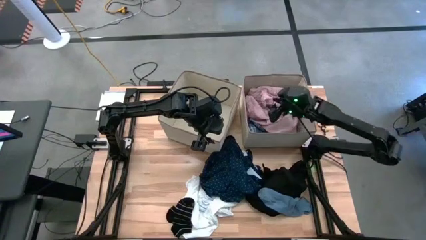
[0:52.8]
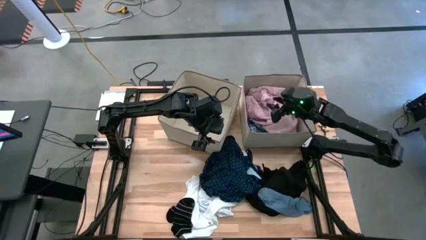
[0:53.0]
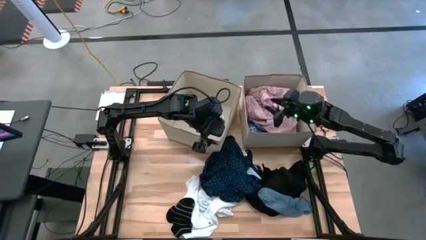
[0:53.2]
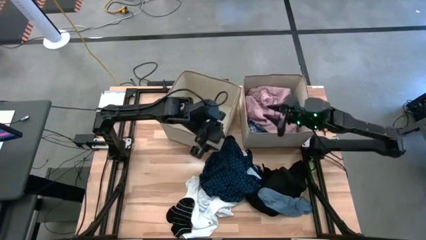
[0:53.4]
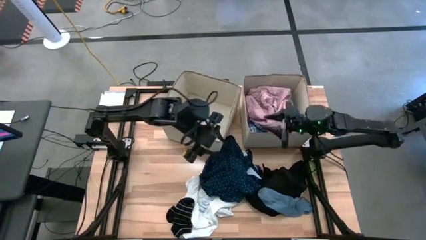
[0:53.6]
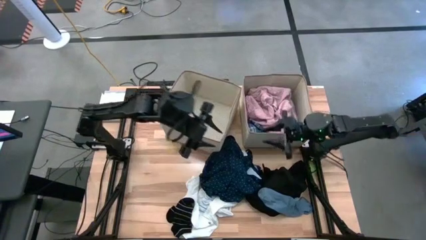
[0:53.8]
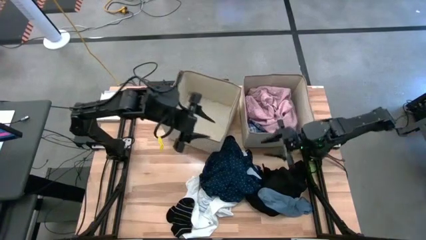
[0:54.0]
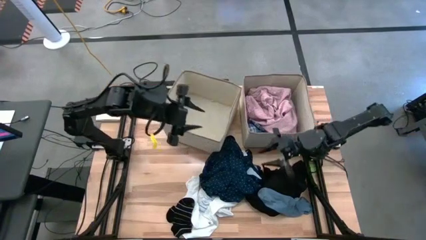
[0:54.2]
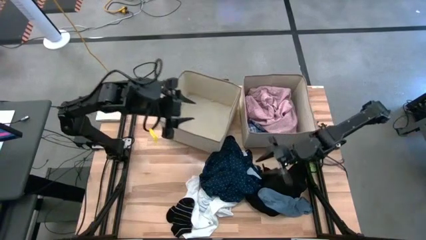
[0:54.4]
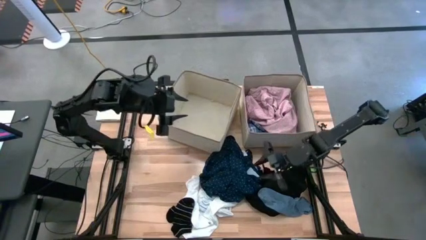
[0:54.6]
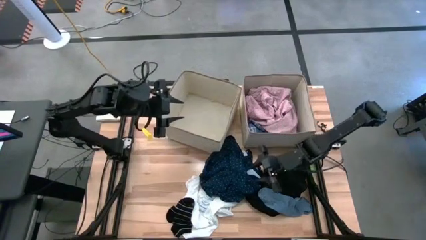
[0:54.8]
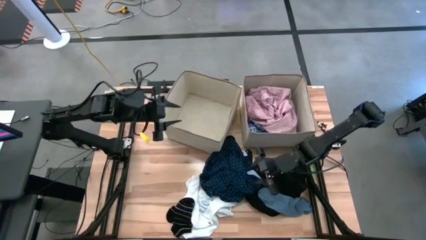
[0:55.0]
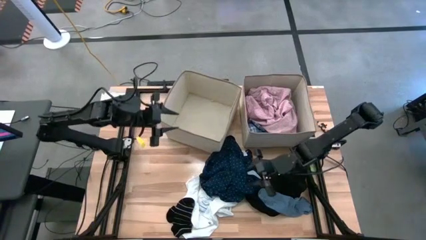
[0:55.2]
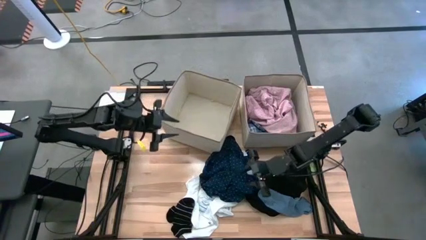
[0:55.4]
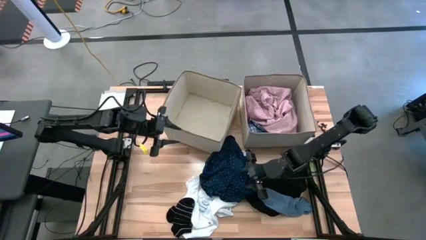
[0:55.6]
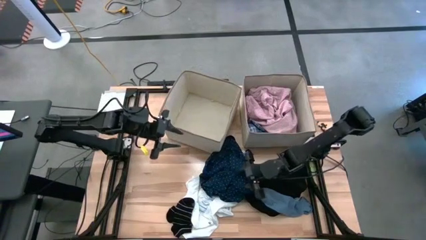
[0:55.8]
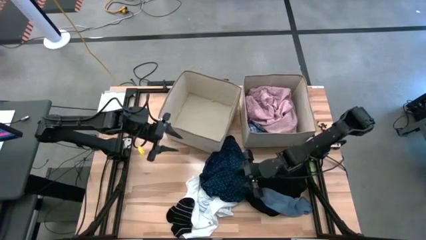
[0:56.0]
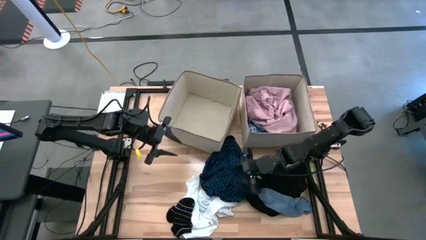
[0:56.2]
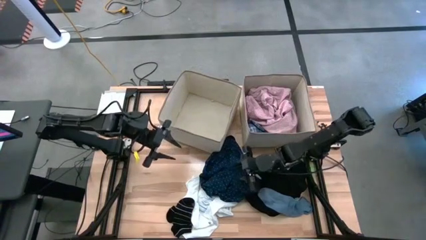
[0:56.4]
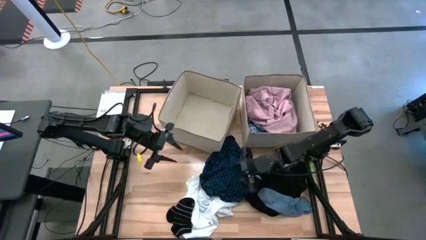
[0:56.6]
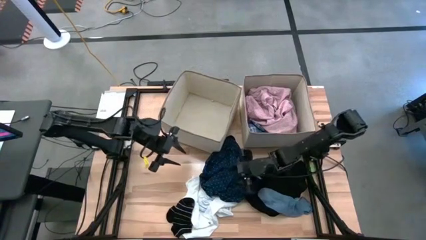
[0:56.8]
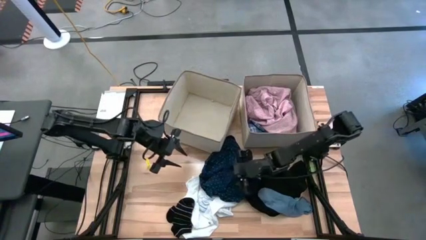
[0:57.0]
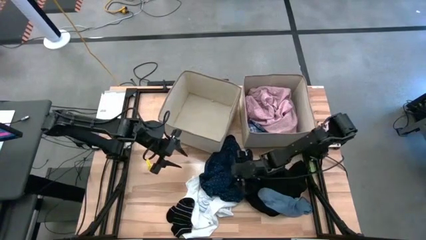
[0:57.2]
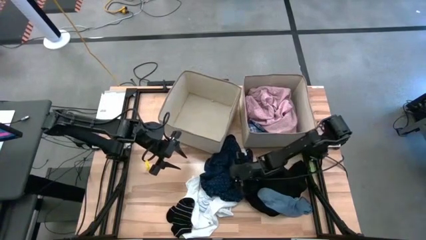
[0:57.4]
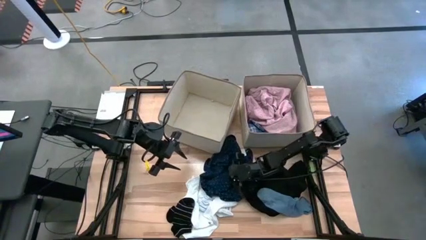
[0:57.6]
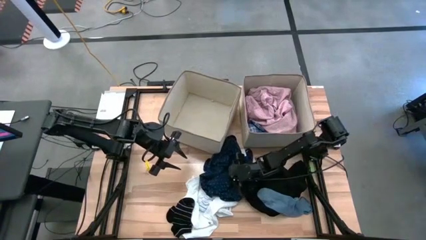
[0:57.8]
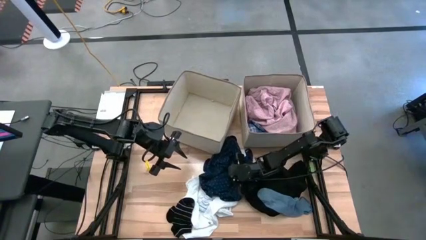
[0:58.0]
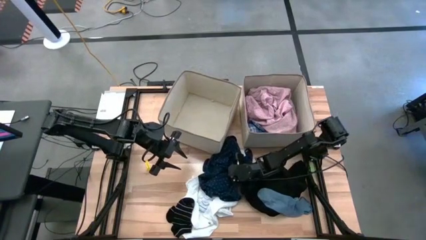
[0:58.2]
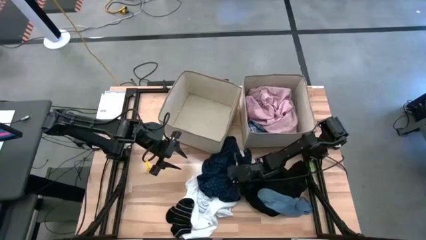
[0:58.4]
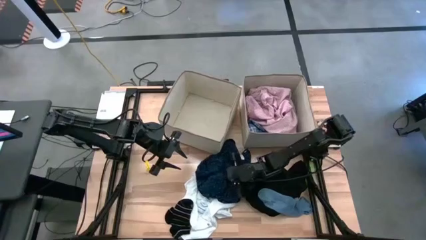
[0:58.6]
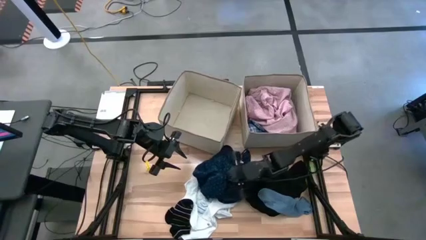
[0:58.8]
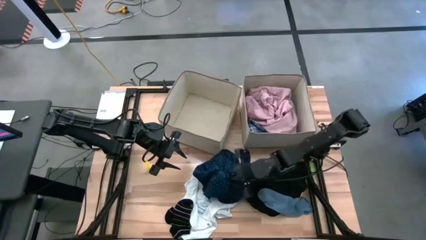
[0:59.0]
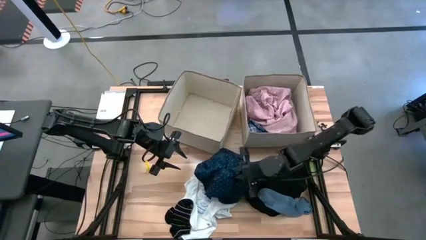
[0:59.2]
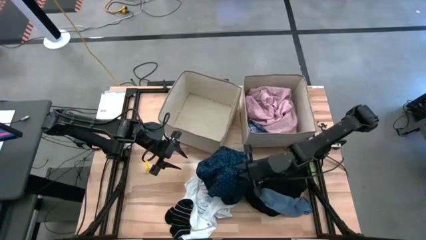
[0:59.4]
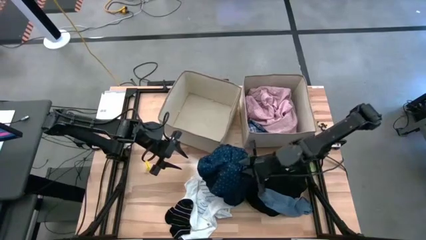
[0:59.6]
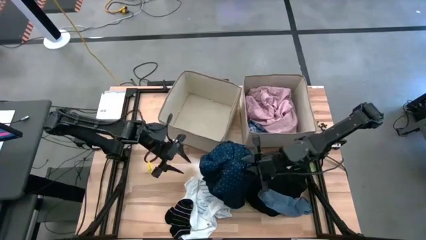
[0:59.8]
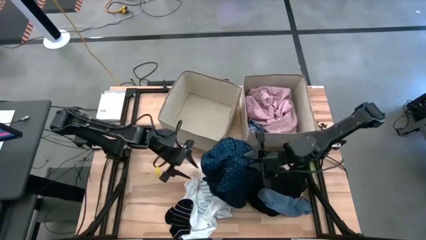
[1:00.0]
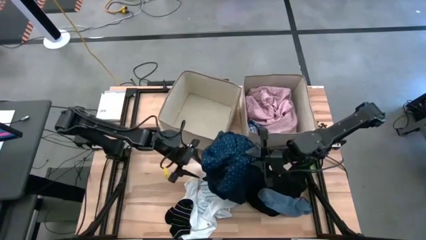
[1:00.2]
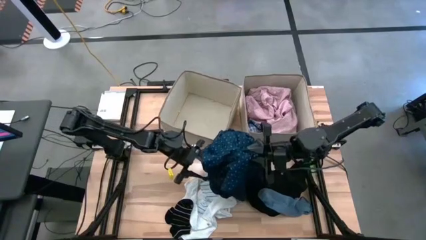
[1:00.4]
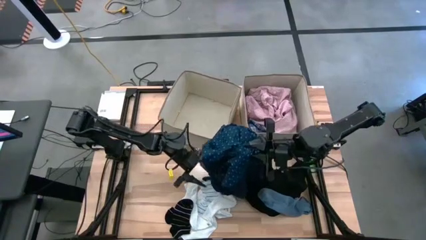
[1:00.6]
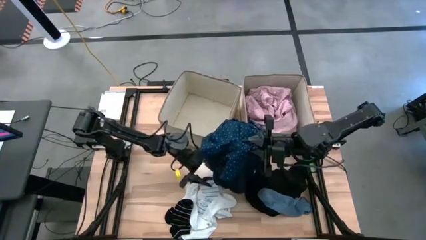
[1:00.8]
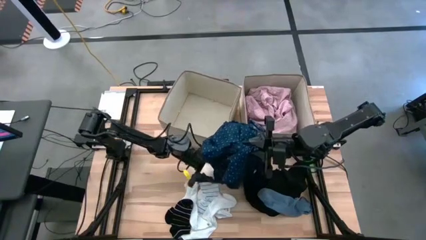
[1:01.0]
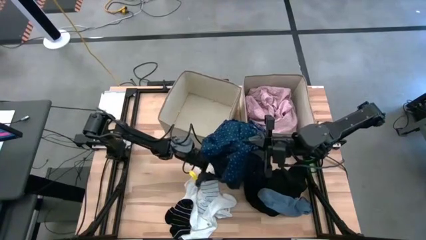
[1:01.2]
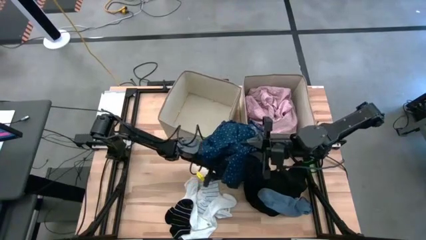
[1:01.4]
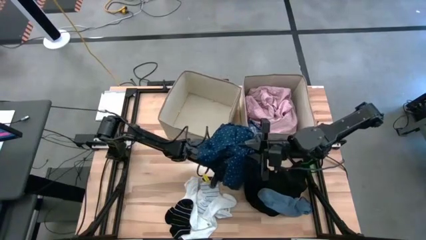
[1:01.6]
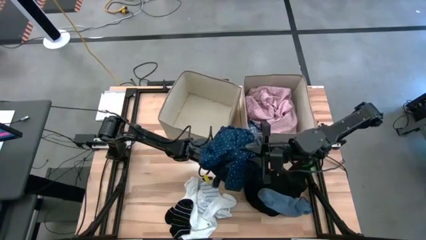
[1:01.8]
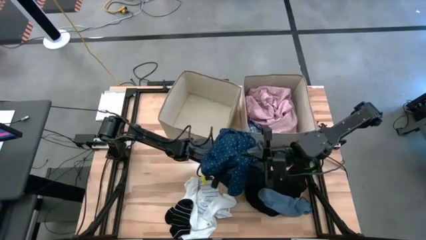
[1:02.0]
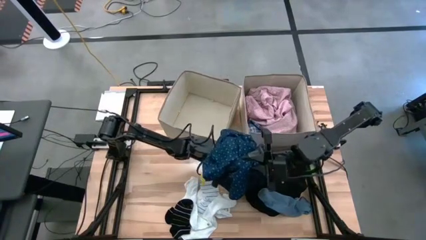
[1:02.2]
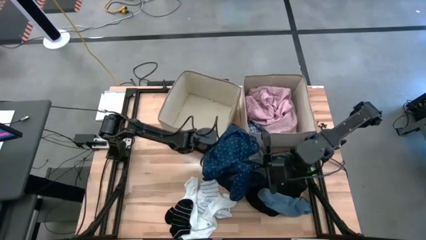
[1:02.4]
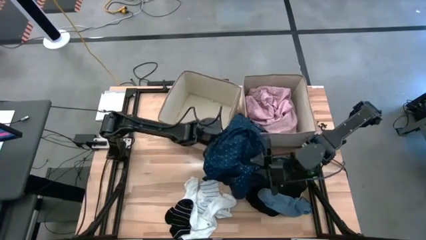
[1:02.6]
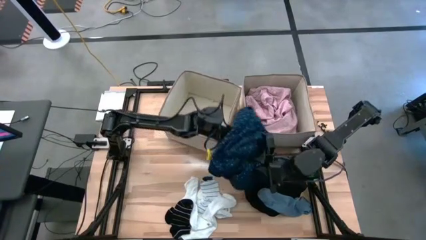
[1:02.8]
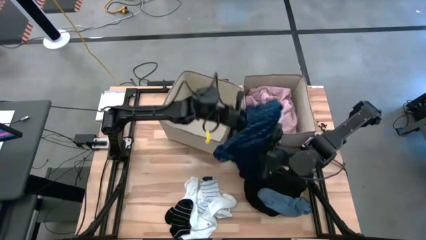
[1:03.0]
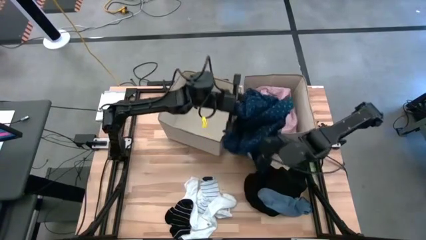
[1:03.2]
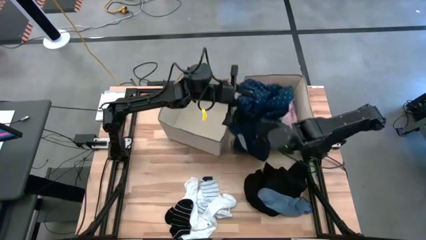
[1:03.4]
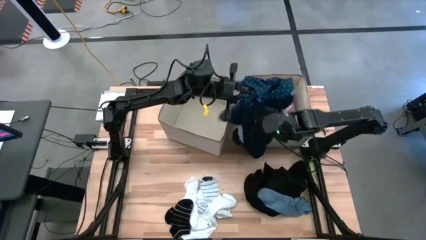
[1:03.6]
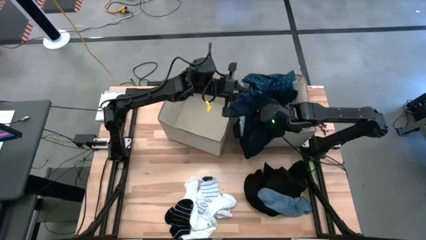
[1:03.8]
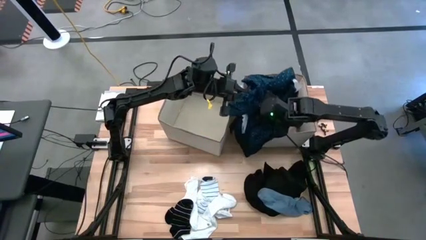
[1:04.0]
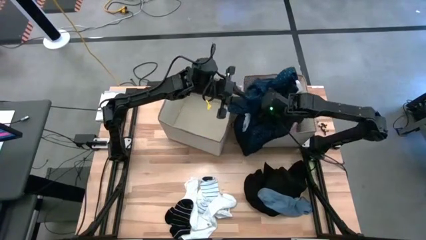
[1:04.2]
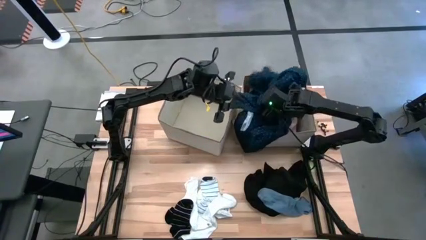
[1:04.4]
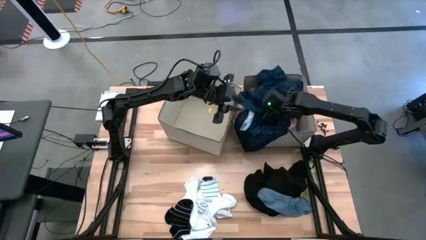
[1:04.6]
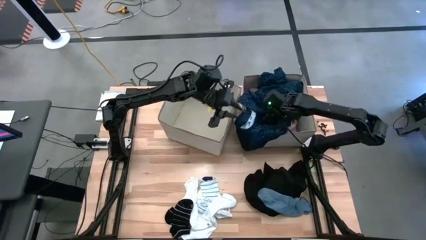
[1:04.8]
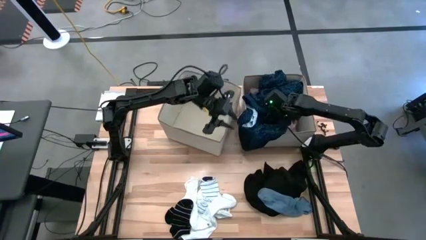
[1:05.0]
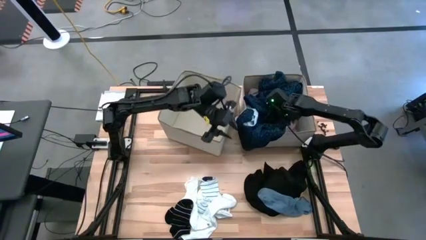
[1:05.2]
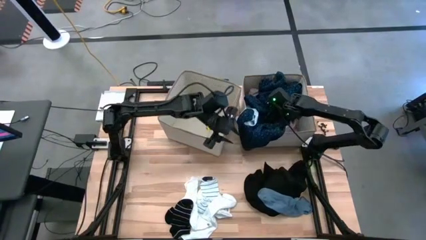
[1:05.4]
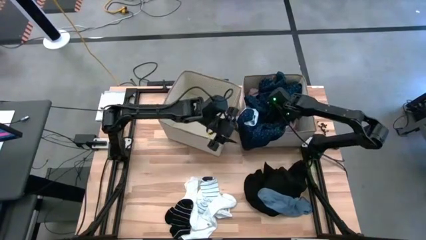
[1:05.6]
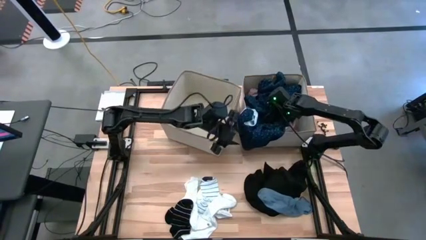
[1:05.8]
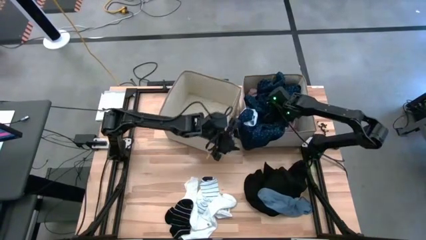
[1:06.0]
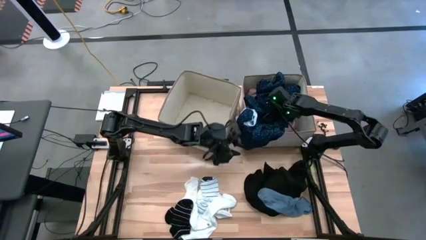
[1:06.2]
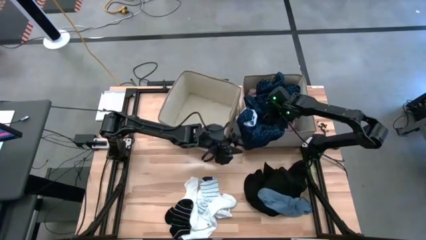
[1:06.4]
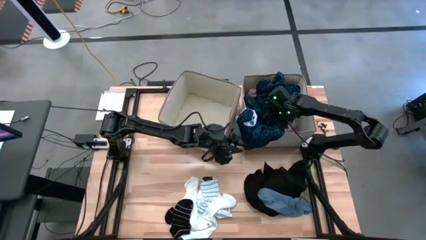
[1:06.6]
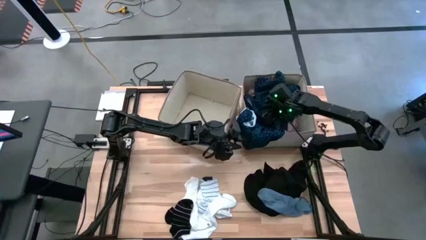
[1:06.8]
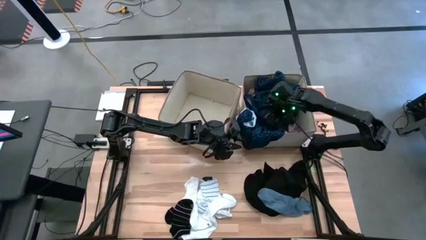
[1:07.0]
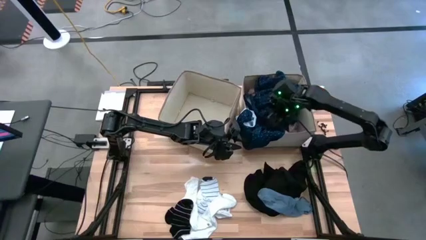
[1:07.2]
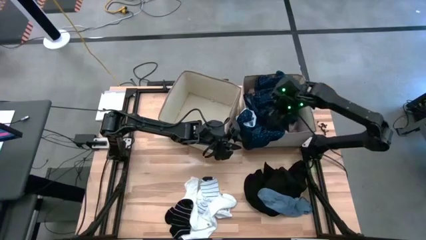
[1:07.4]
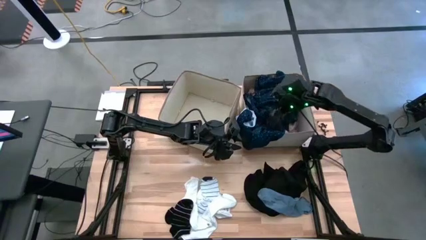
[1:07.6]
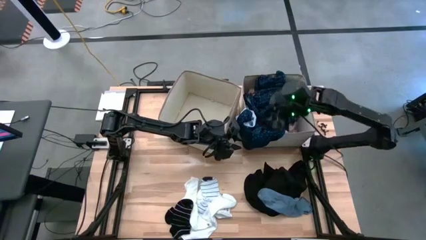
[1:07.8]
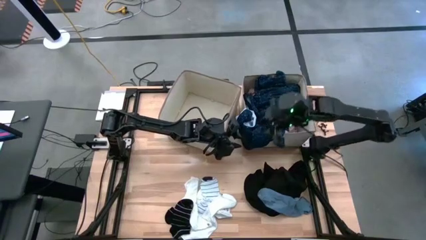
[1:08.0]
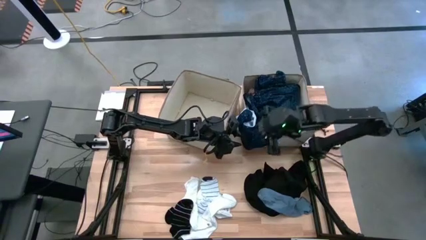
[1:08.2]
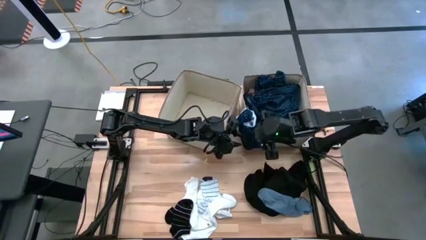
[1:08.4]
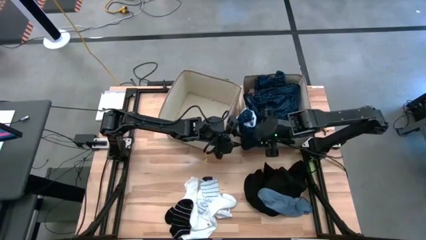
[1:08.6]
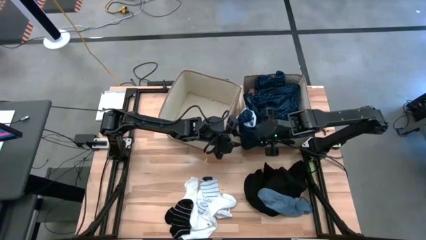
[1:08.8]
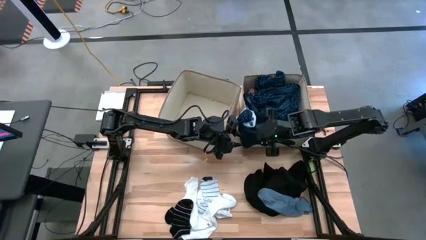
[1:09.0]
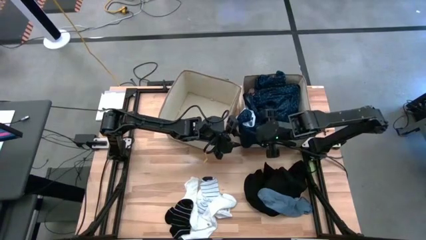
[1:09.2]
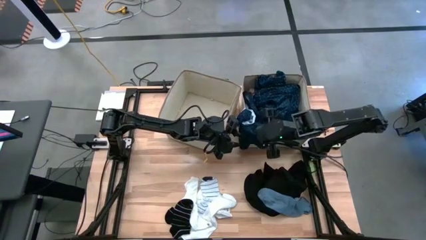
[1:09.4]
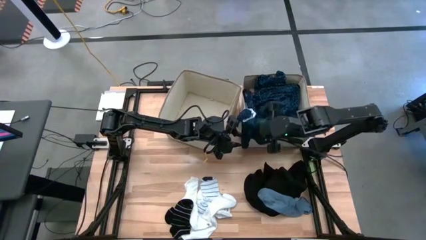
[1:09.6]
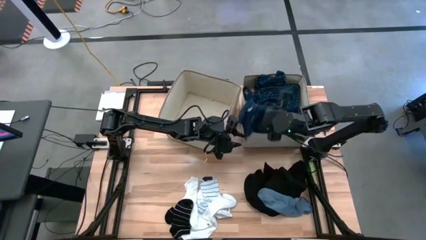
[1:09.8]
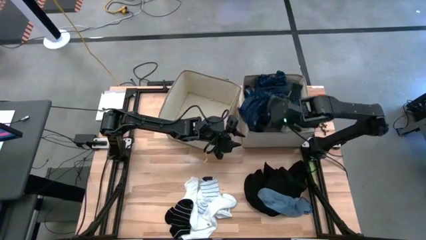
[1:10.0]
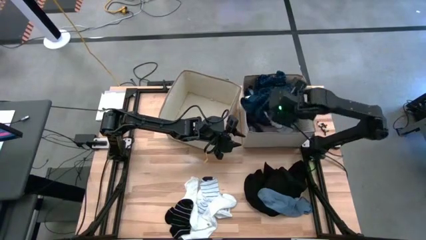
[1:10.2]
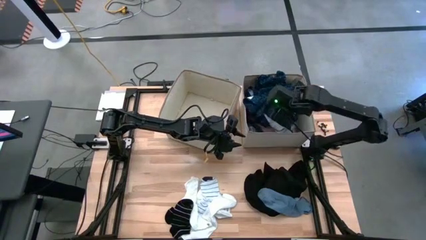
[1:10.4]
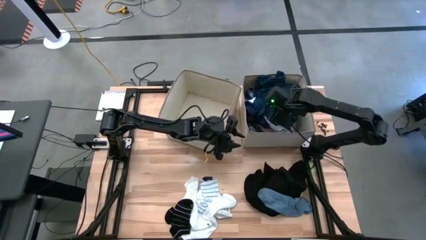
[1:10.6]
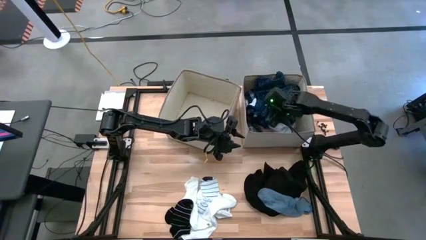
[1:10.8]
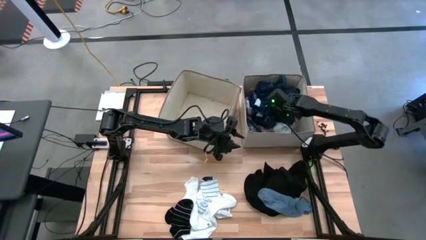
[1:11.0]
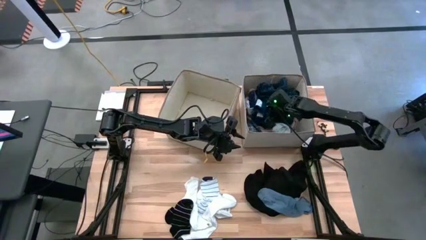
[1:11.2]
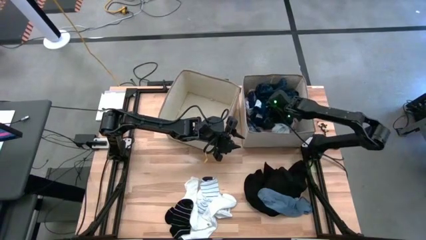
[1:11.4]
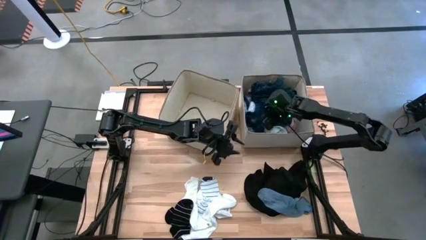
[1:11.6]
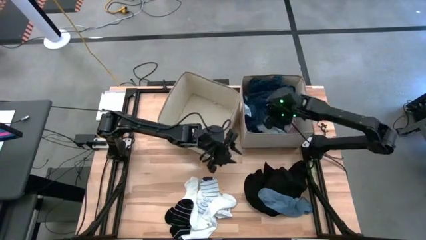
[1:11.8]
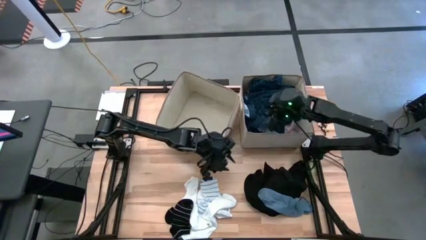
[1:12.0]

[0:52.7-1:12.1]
Task: Sort clothes
Put the dark blue long sleeve shirt into the right laundry organizer
